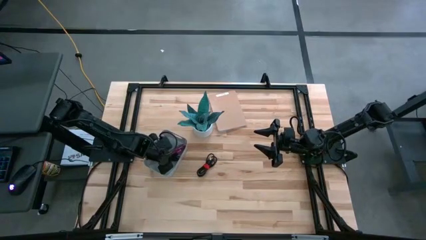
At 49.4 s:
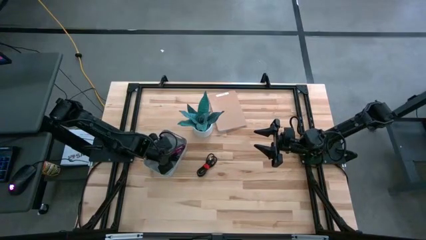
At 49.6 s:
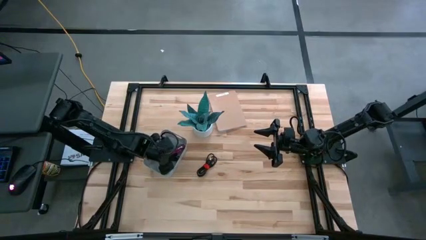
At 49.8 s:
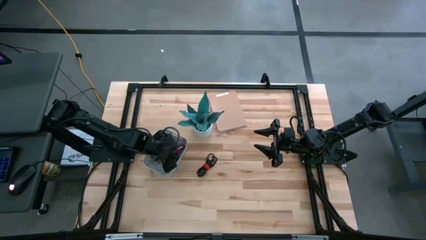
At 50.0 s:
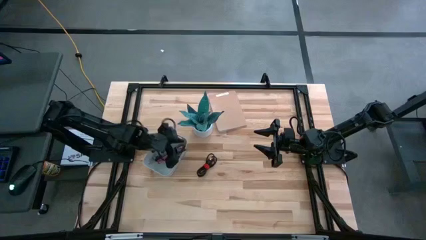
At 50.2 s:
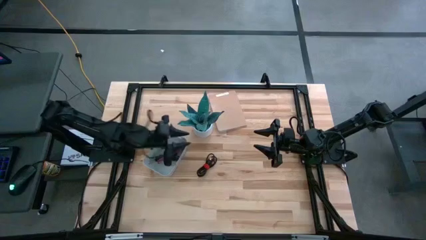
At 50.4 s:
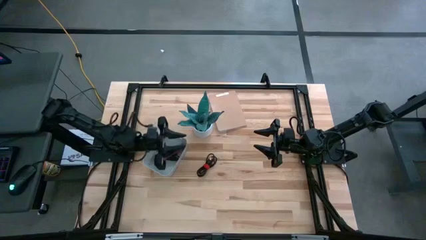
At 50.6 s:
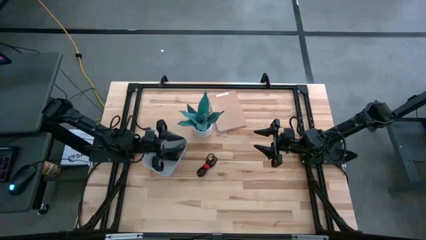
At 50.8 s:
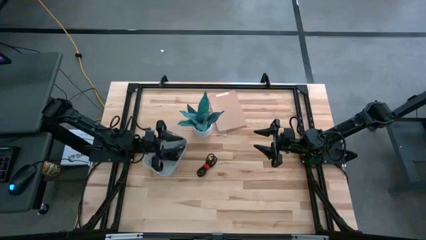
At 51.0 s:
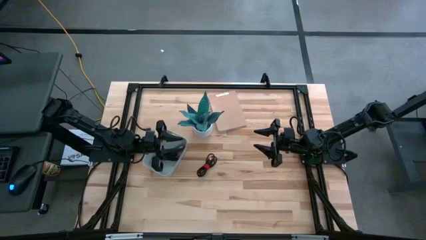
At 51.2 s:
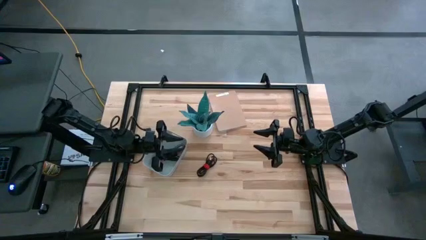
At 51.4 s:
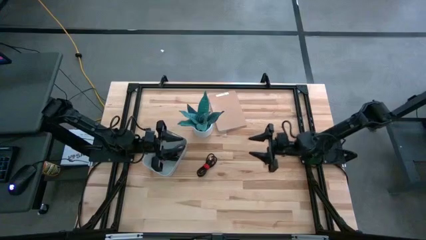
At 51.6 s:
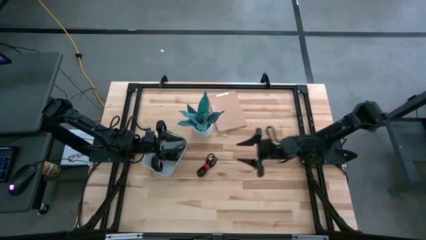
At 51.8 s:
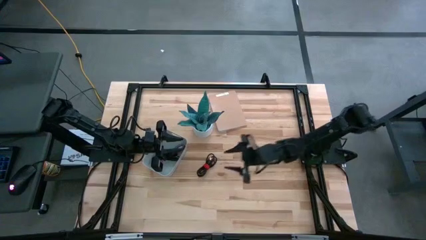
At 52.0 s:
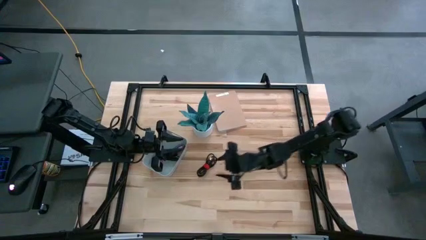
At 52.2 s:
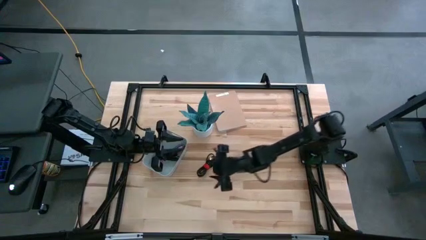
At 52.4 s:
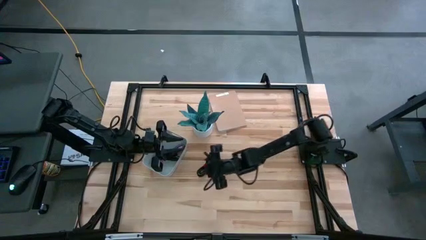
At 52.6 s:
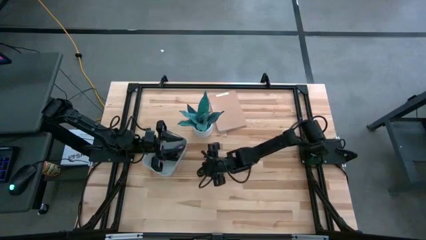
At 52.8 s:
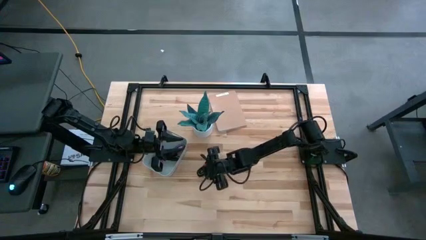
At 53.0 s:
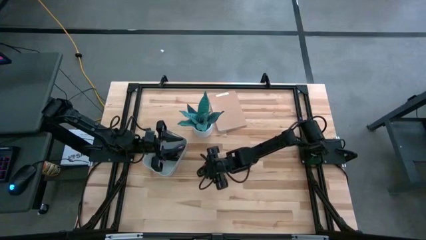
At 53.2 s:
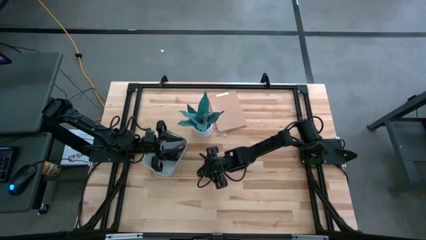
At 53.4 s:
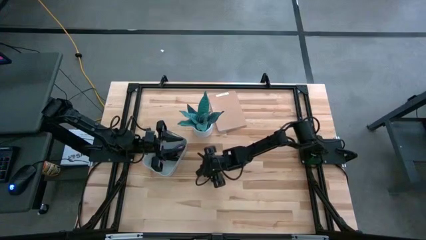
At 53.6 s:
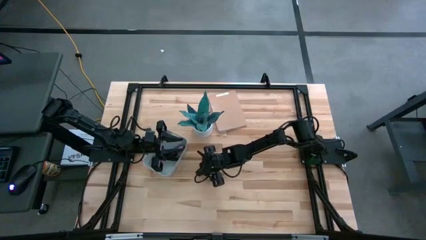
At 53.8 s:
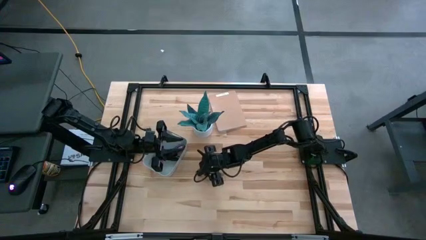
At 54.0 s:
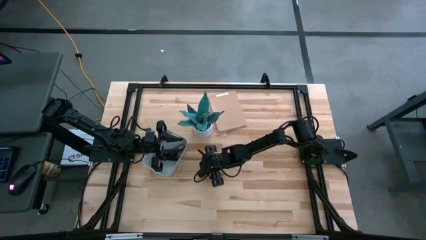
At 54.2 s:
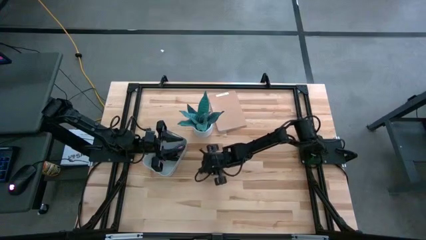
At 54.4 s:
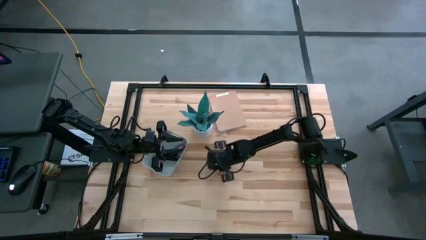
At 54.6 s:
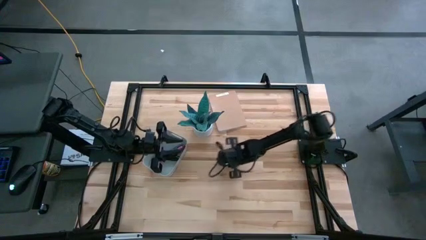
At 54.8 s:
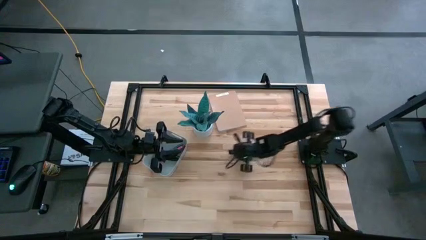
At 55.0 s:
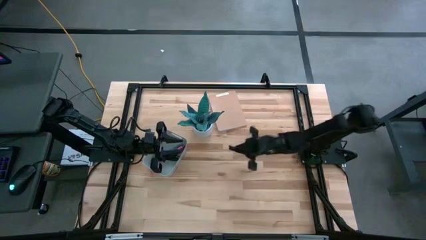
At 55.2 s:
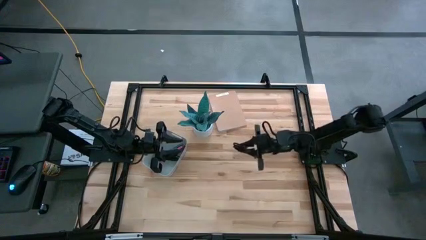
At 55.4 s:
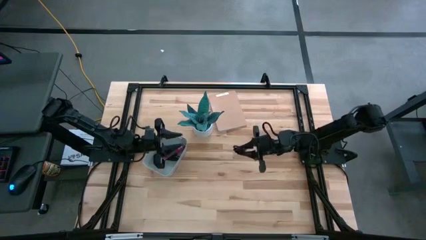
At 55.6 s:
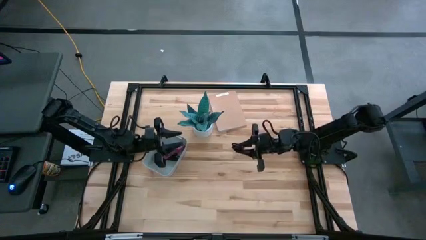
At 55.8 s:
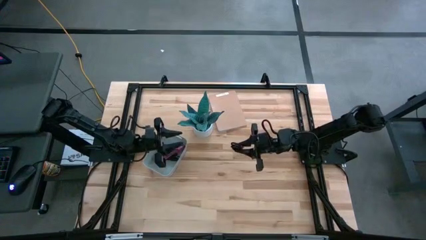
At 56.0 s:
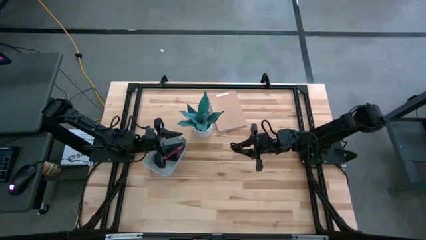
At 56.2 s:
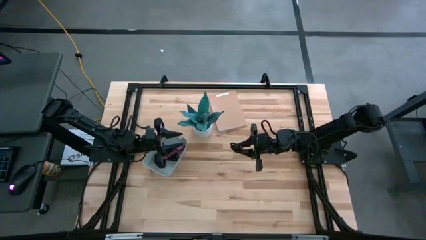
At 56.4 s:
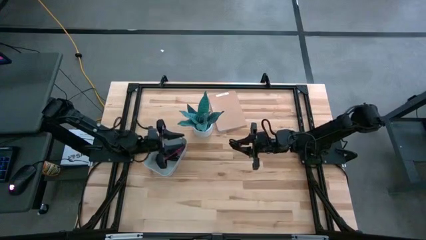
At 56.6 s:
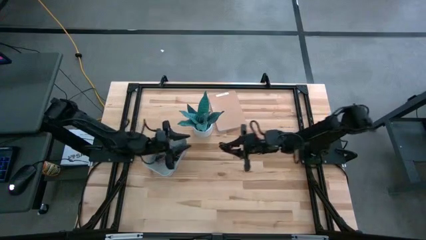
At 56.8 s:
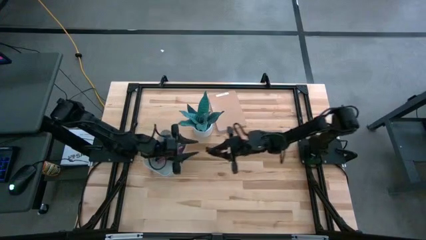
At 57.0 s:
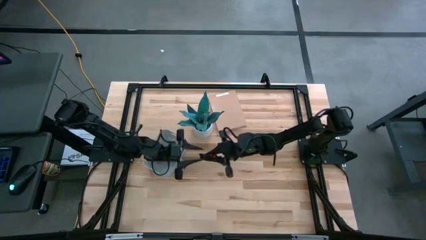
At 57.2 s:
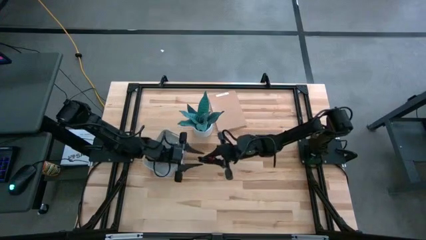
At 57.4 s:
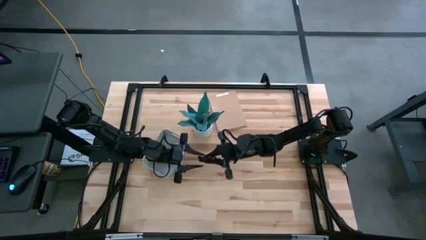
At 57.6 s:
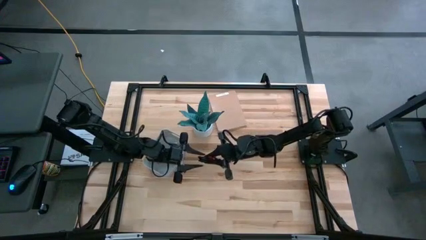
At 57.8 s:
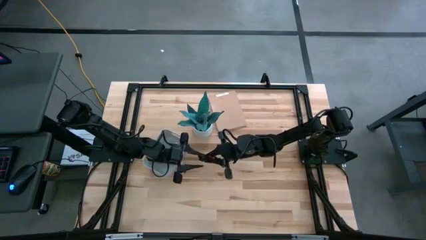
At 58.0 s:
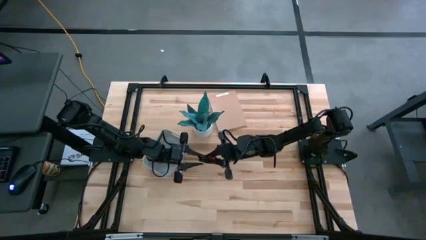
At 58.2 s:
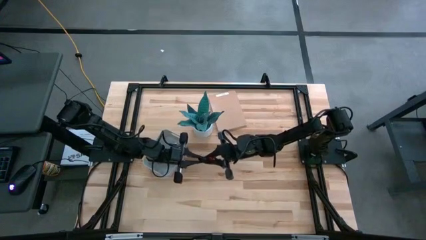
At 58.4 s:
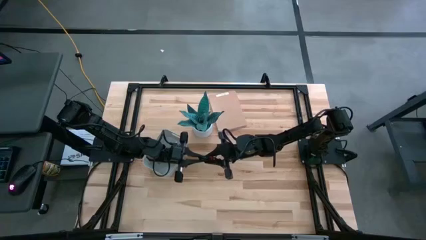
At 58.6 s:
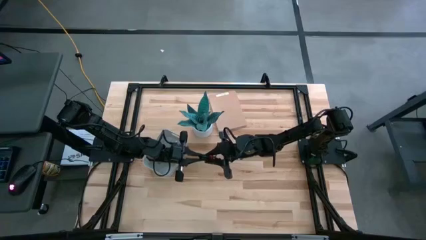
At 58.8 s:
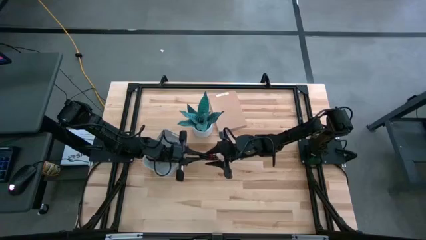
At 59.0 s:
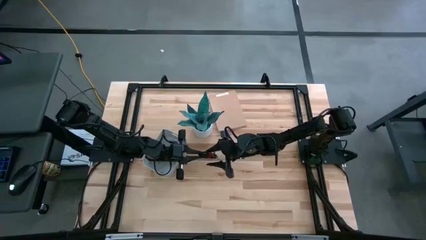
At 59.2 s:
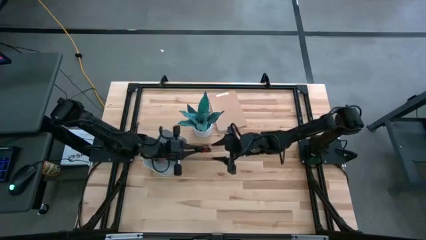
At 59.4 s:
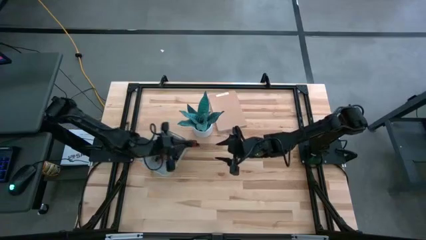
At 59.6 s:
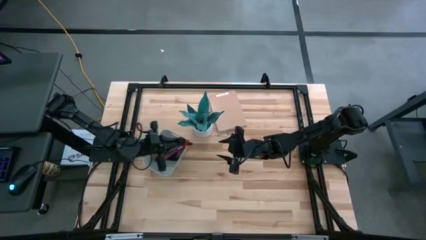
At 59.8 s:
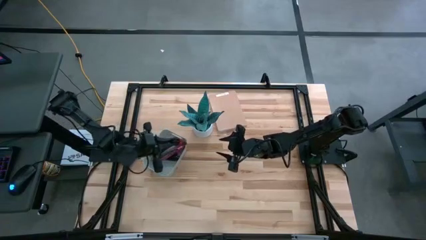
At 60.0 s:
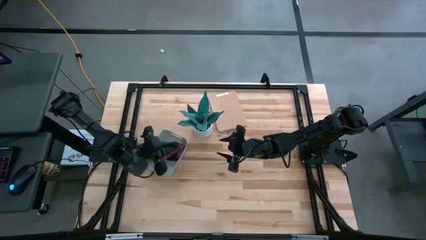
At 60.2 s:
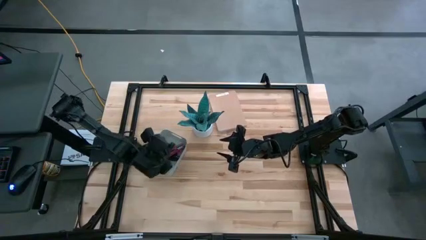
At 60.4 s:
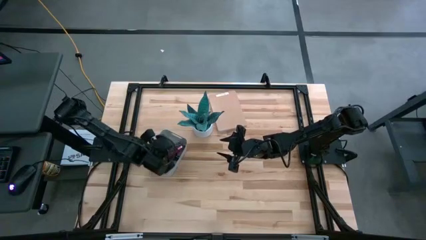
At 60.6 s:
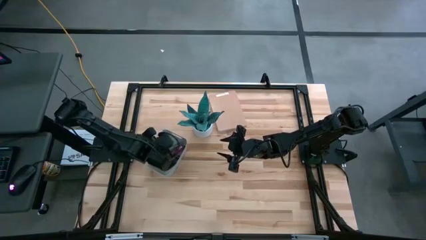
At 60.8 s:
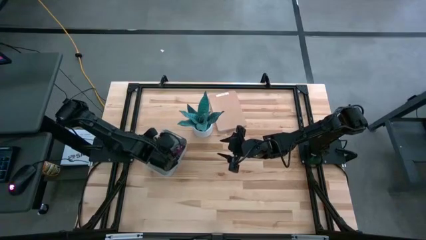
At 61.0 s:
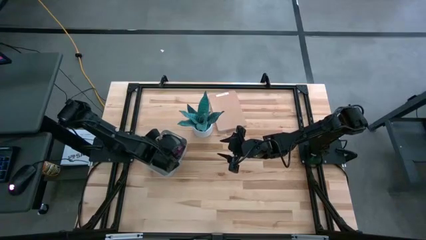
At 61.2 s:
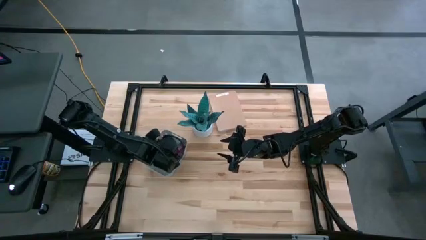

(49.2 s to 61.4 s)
Task: Pick and place USB-C Cables
Put the black charger cable into the bin
